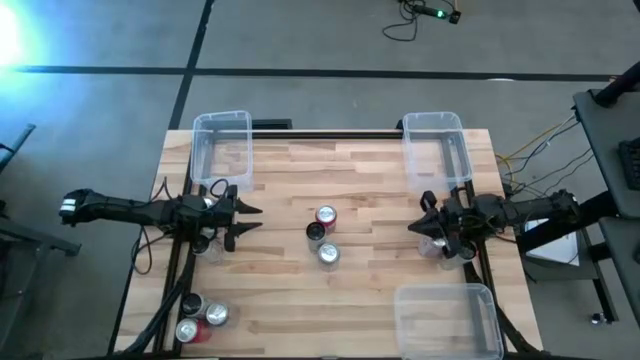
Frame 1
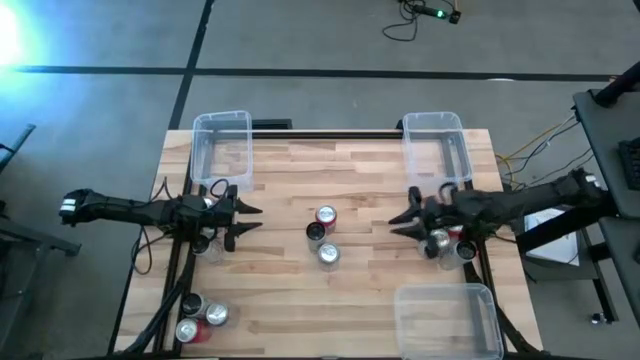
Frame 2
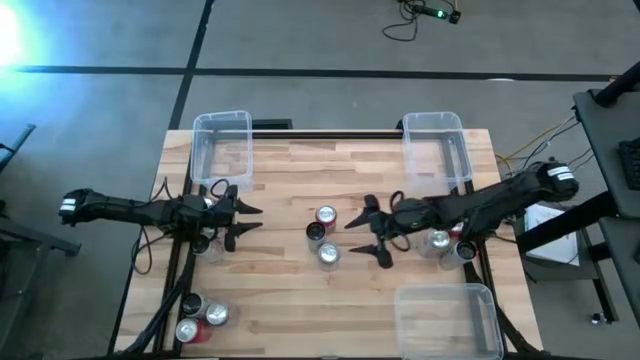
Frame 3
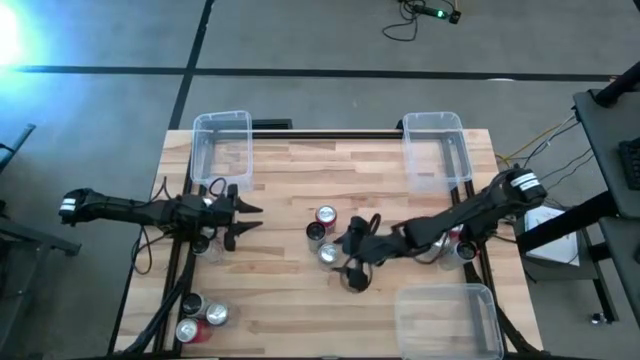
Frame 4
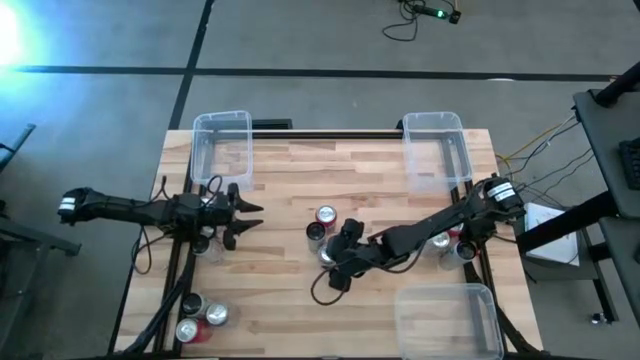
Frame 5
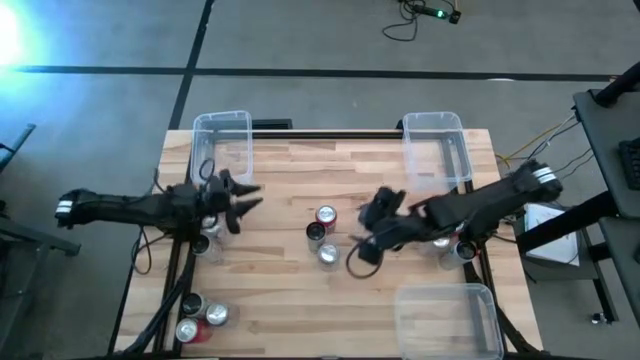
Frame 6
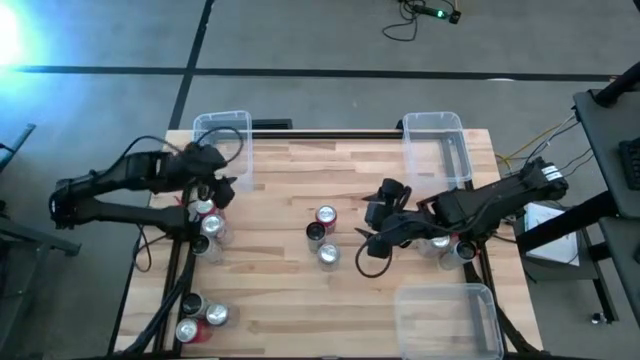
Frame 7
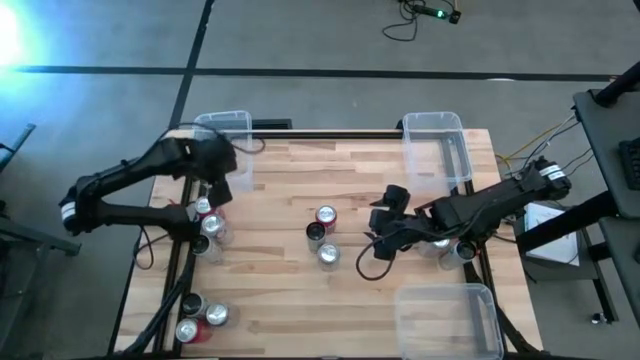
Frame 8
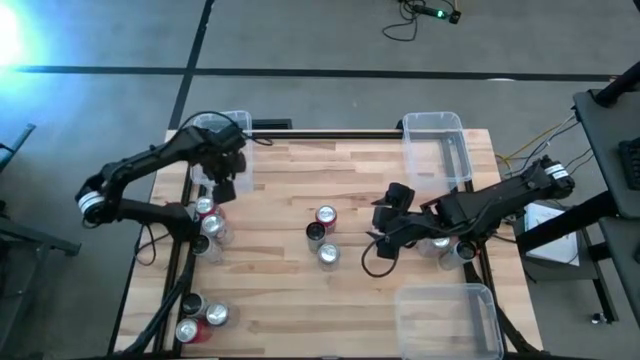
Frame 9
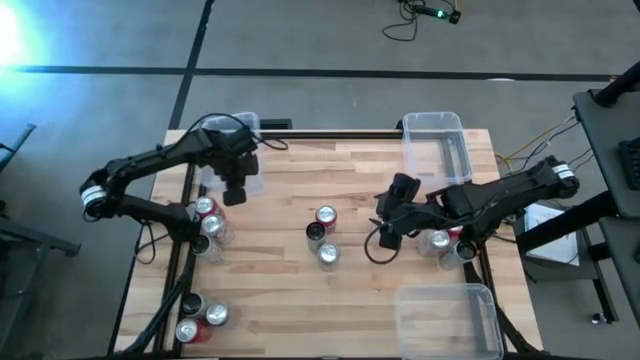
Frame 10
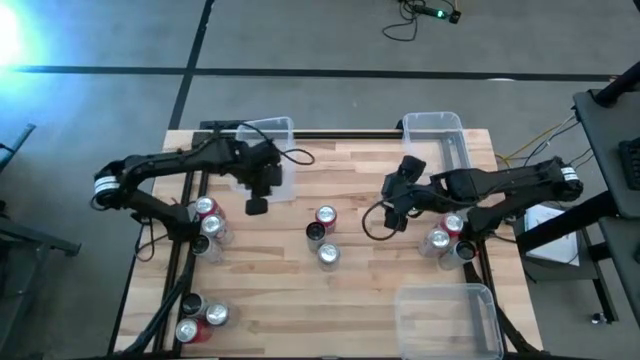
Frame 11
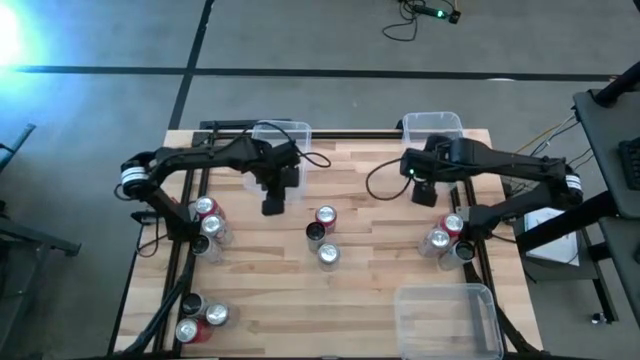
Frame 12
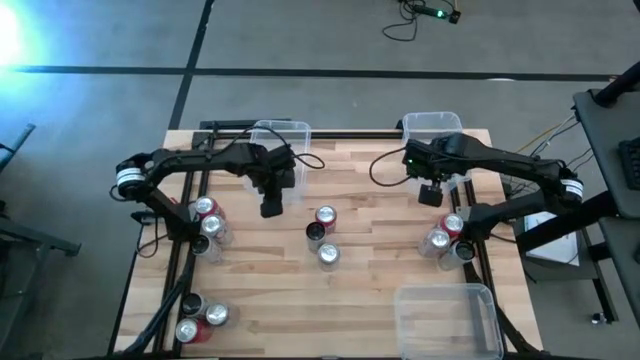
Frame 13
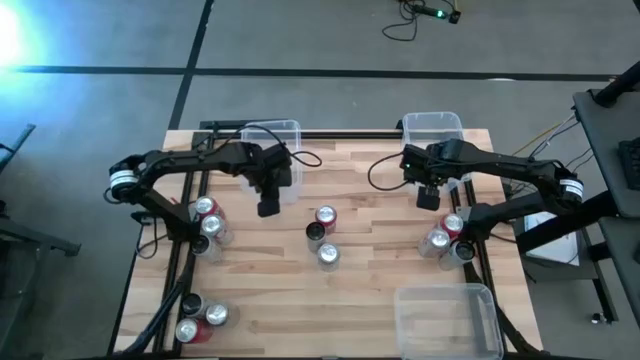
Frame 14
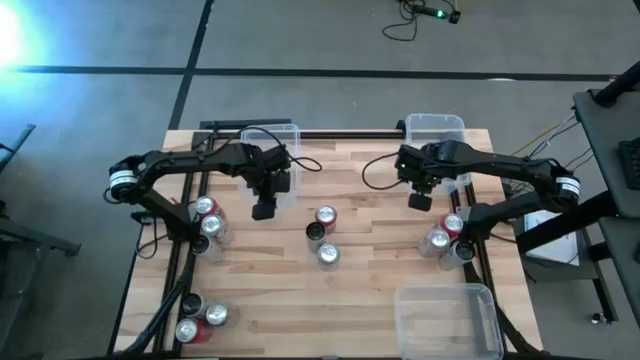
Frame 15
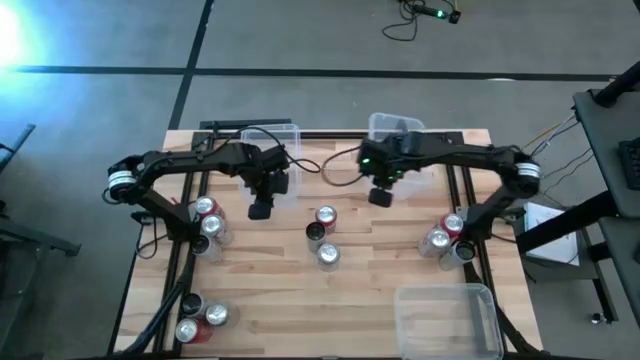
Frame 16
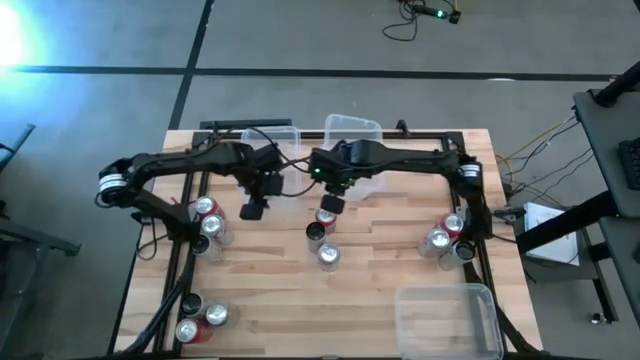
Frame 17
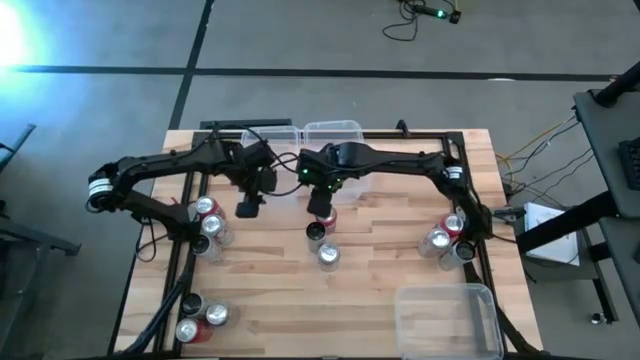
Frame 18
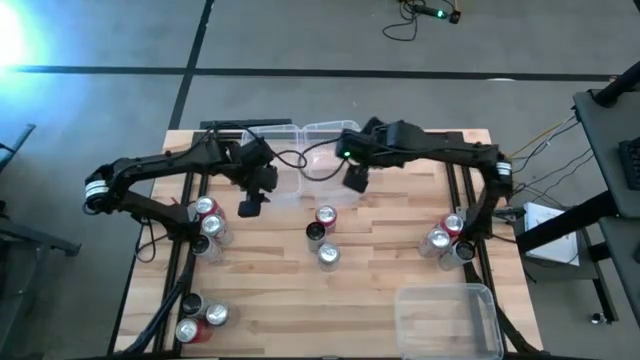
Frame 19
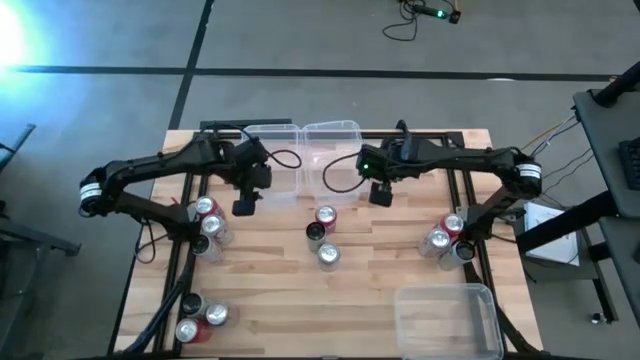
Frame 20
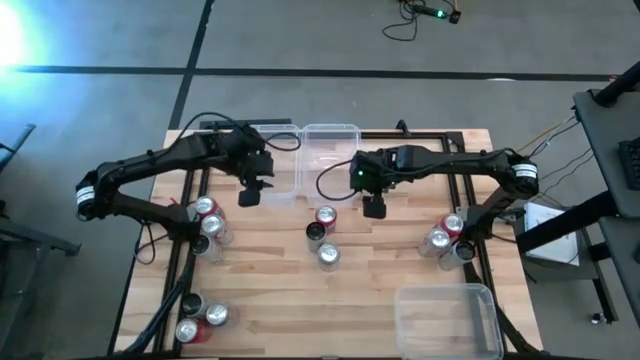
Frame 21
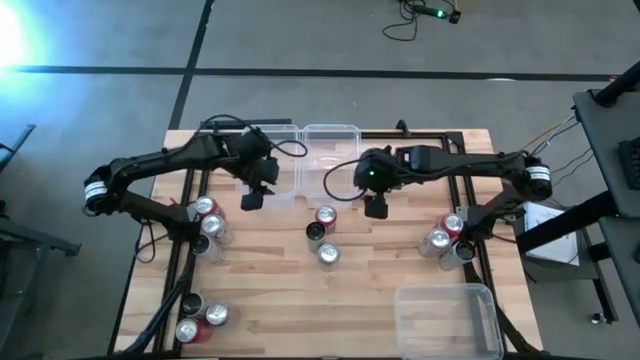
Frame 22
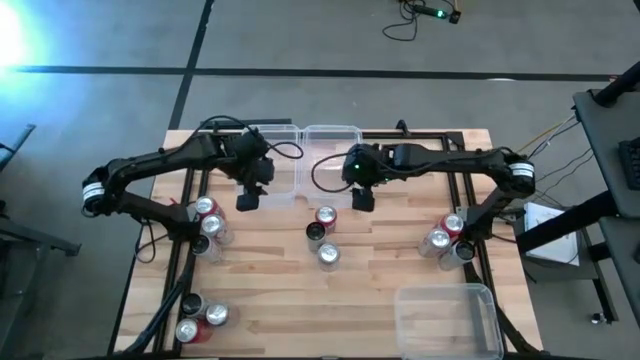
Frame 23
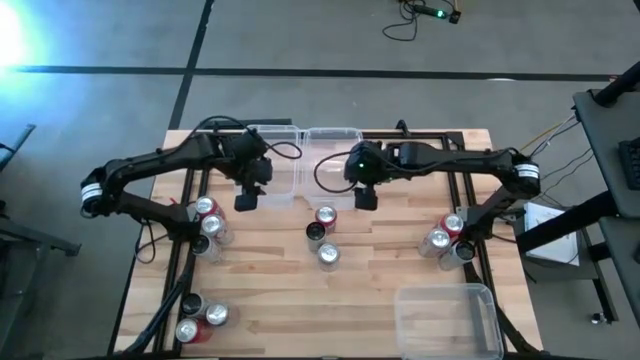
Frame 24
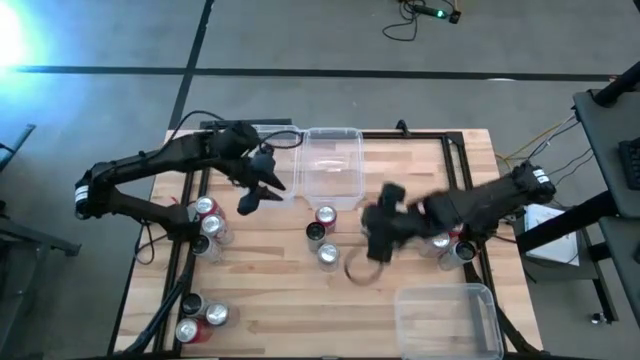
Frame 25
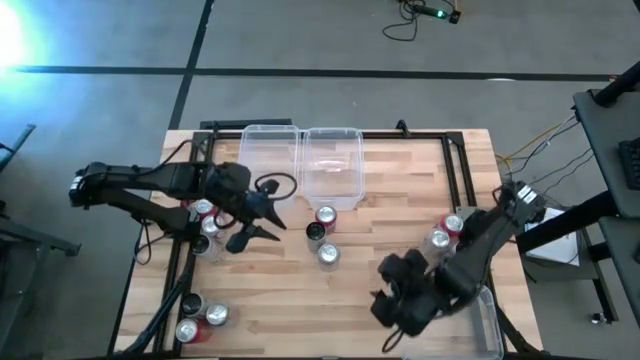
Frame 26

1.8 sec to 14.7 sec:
Task: Sort soda cans
Move the transparent bins to the top middle of the table

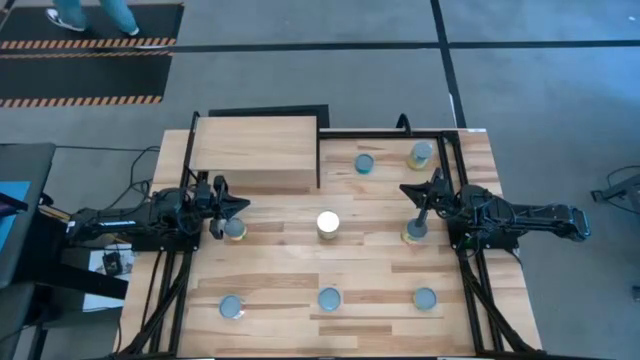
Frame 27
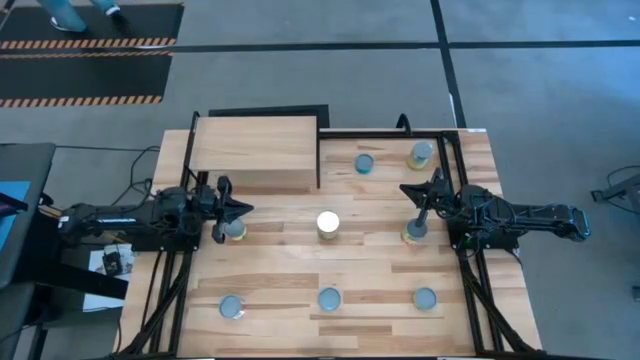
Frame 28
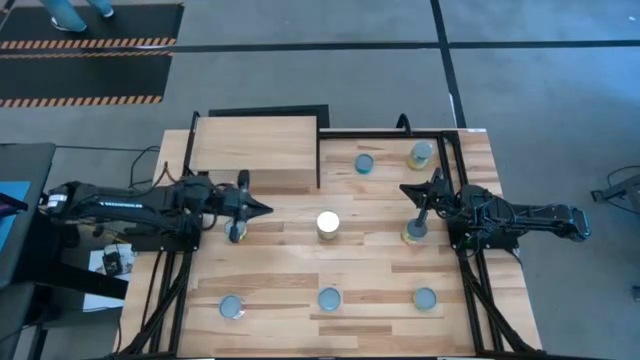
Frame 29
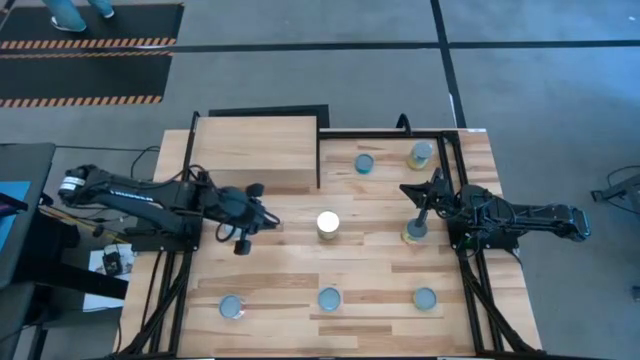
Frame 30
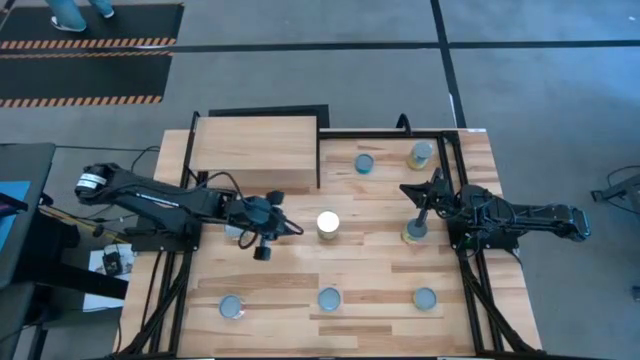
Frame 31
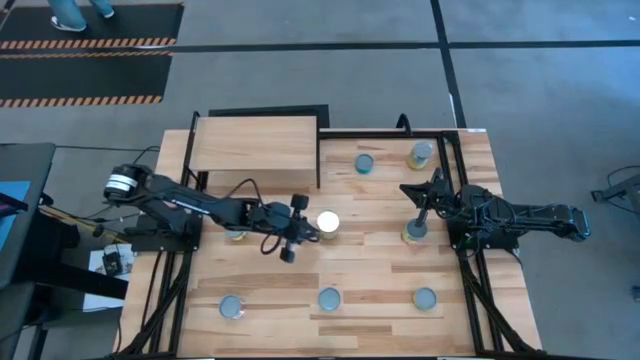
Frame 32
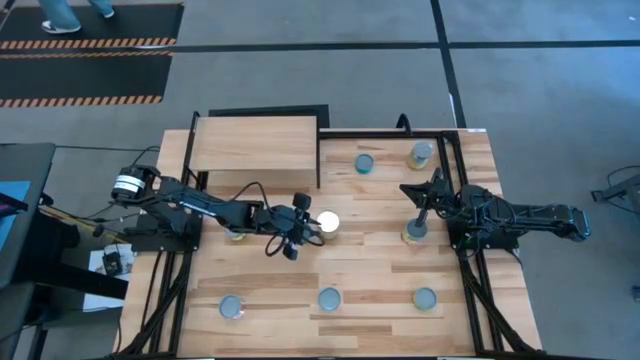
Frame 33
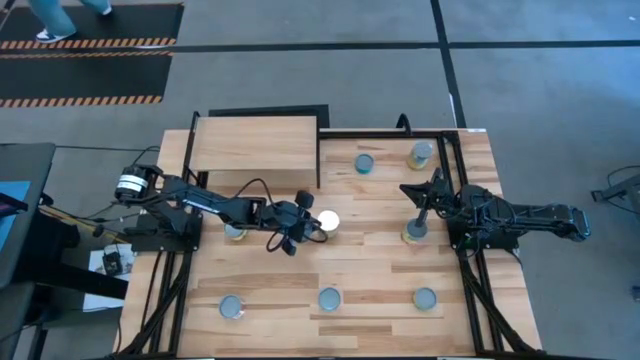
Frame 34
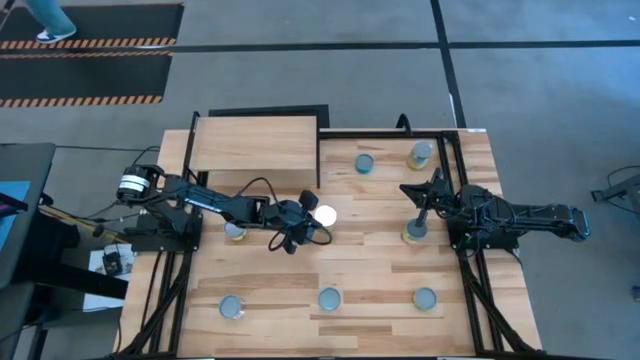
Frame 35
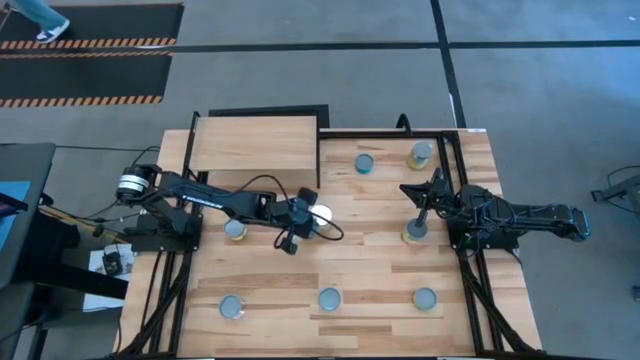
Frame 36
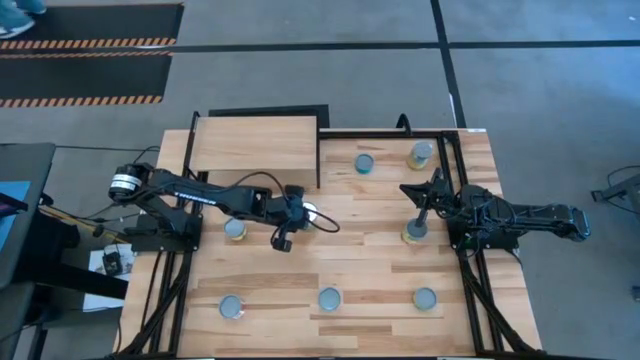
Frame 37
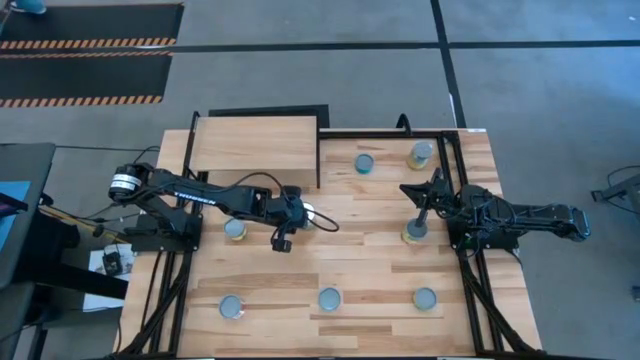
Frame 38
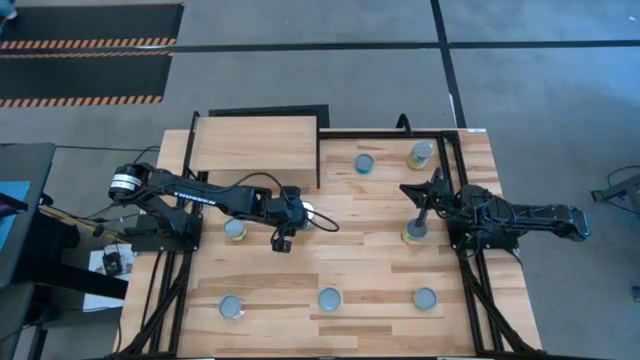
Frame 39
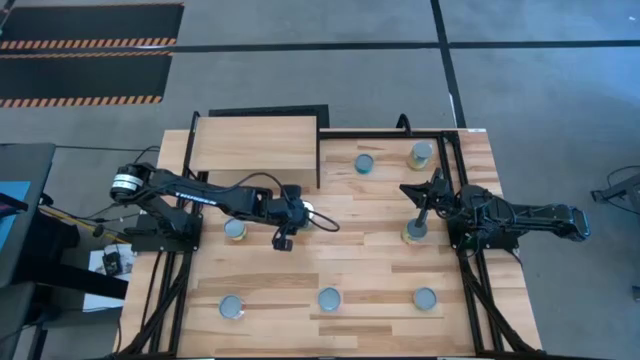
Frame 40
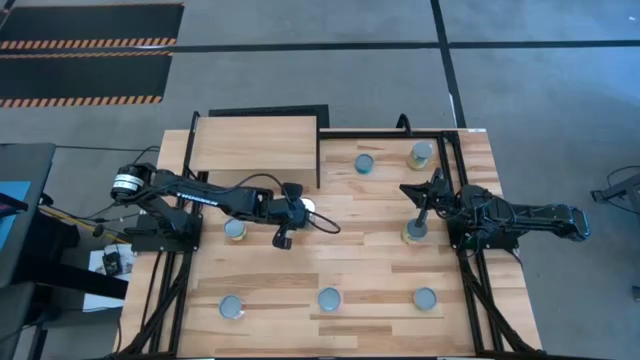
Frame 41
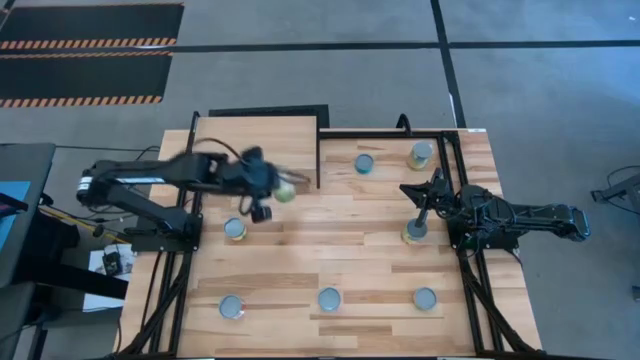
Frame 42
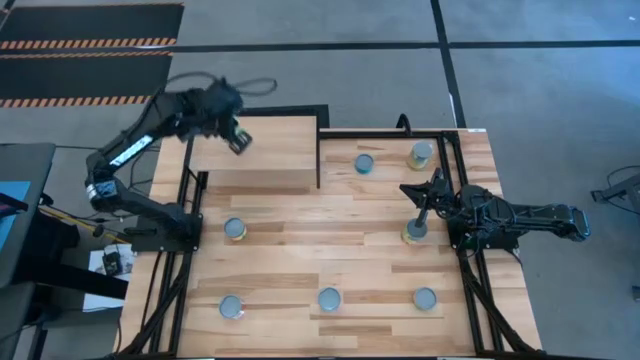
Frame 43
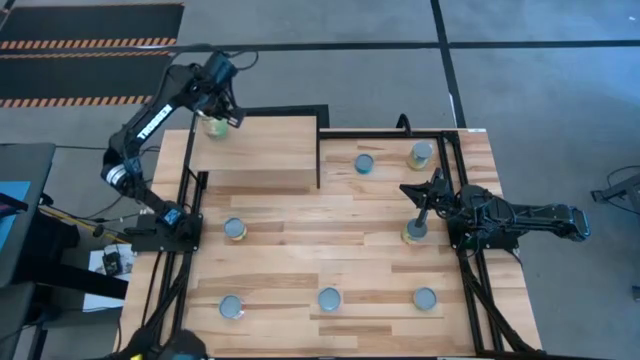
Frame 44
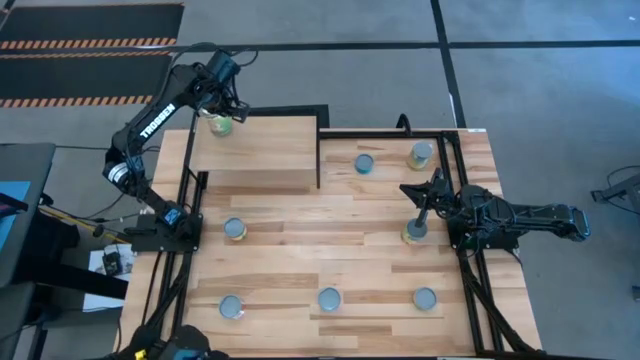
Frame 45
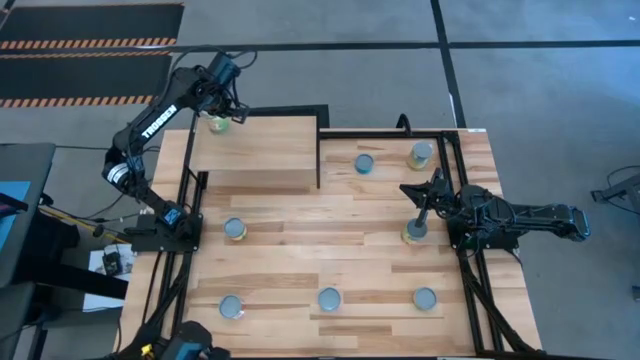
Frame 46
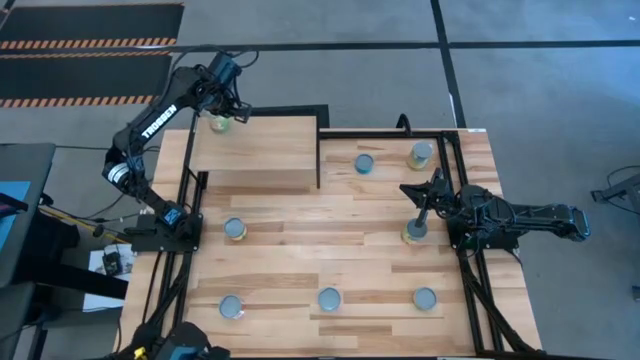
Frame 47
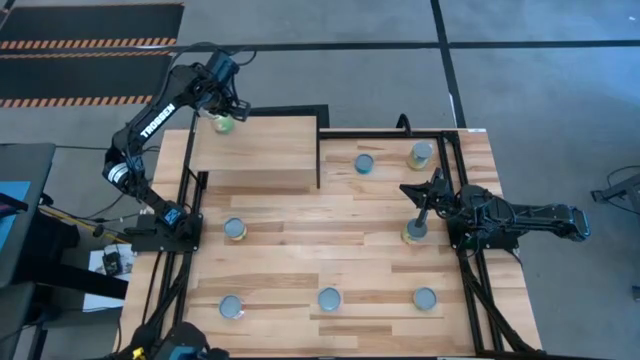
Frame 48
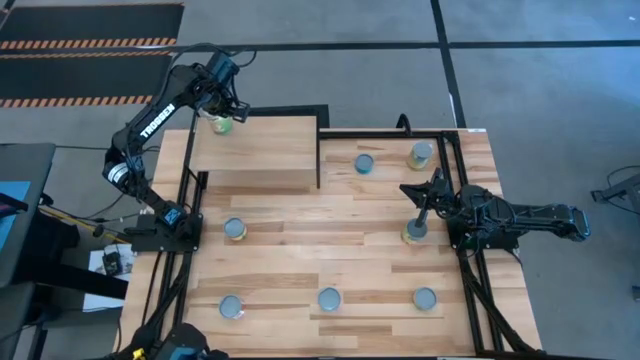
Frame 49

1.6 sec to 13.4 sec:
Task: Pick and place cans onto a shelf
Put the canned oranges on the shelf
